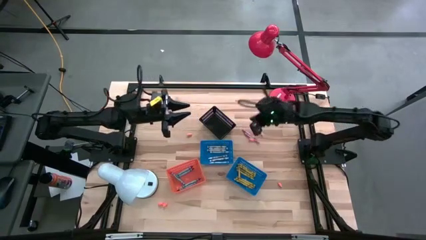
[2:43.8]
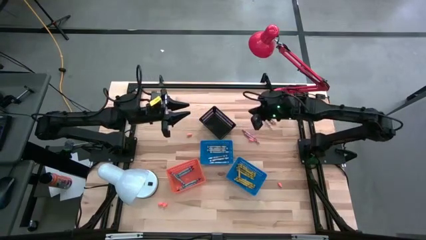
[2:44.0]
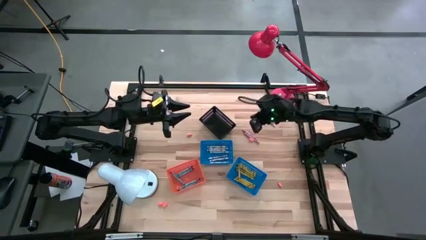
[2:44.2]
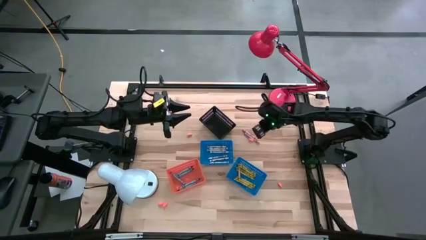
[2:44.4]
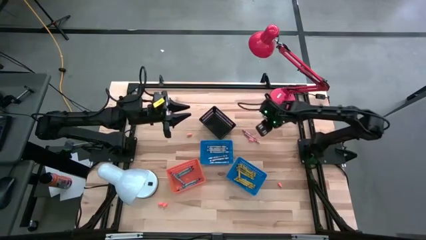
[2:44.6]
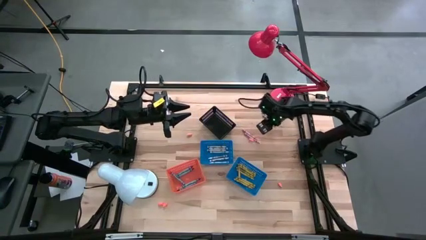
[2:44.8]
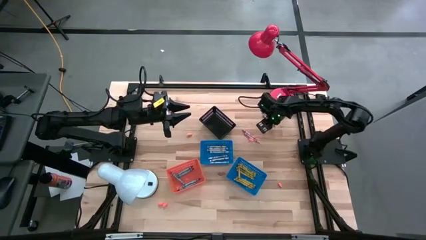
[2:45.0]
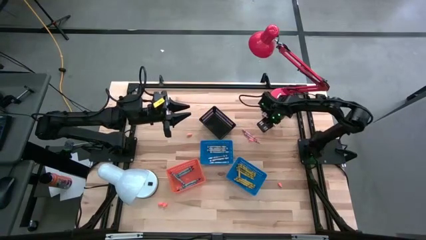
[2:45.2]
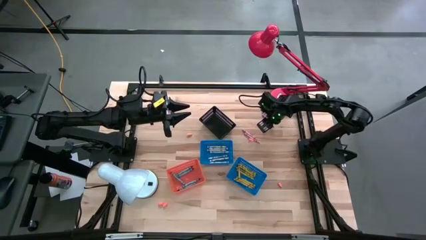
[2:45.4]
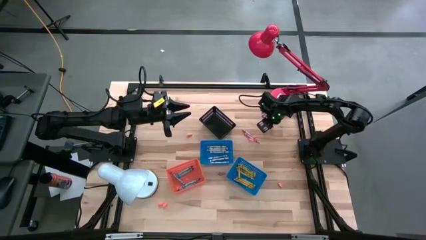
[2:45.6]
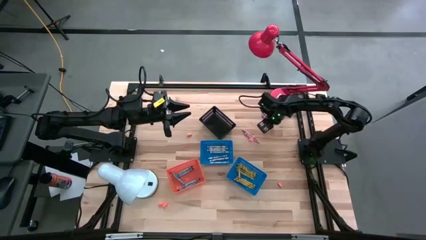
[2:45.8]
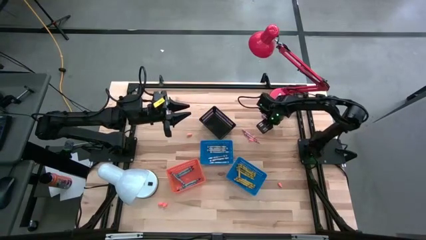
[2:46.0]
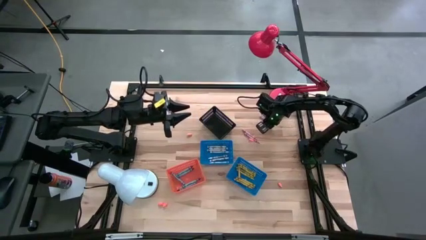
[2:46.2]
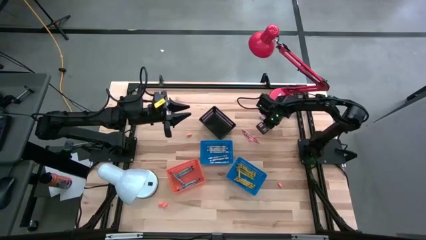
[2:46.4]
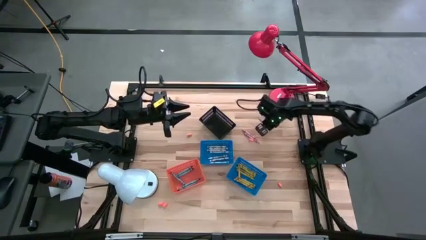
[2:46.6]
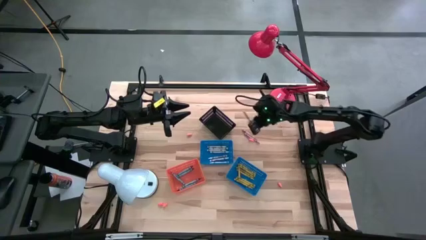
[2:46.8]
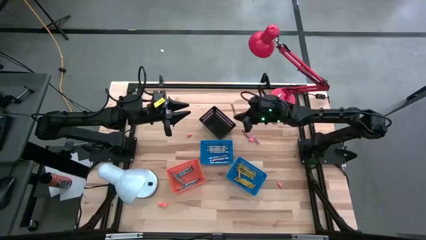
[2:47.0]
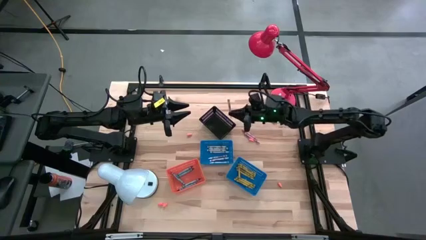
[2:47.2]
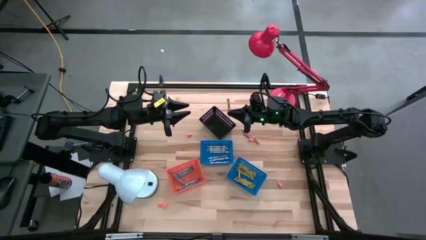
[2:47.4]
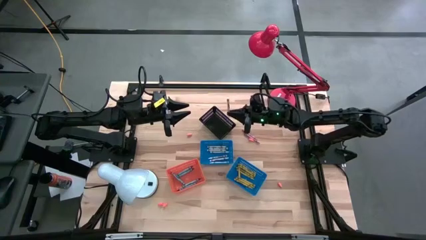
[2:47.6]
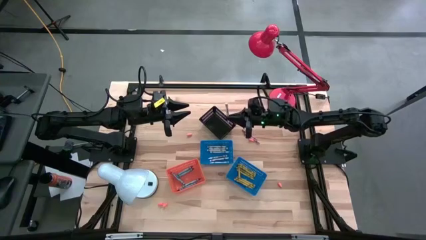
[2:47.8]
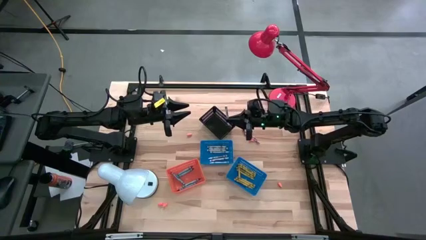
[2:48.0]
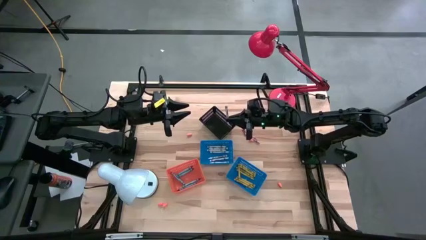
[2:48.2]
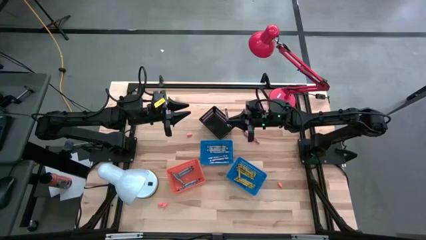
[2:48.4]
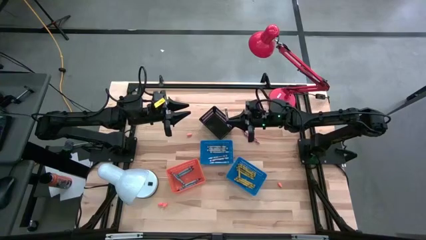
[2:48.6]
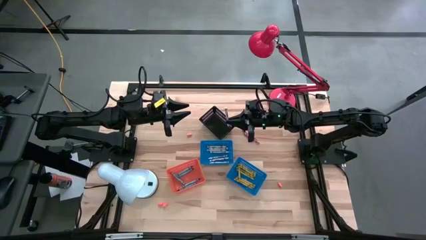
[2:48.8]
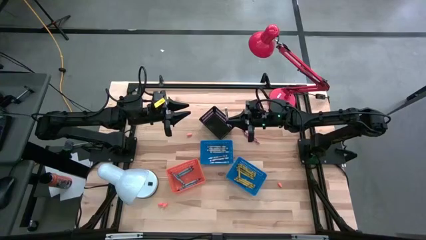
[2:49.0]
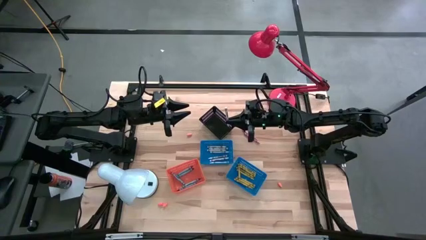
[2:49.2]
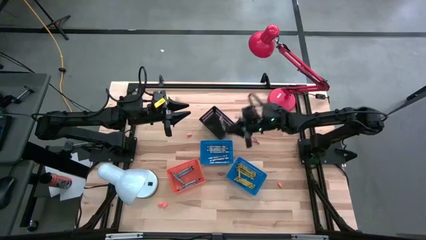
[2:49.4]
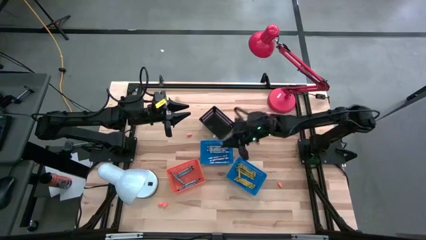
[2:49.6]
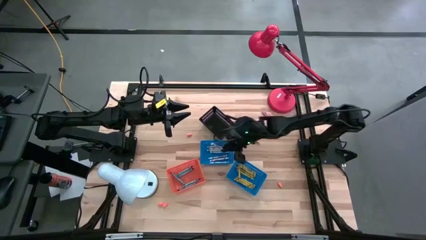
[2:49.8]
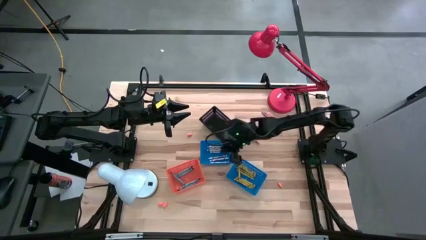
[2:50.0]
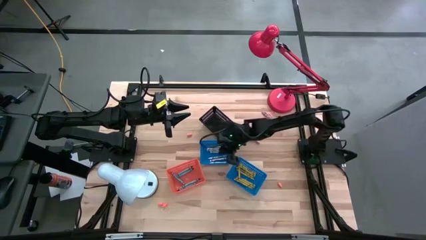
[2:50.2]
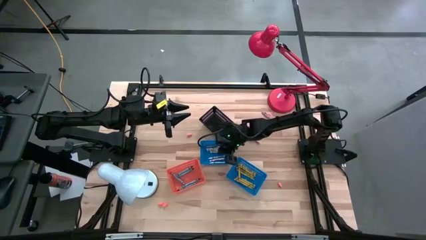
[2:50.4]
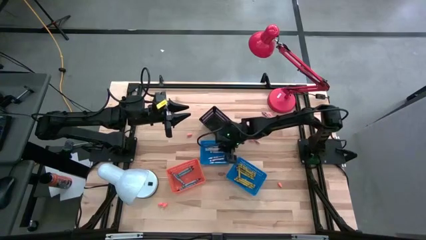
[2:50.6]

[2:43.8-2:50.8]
Task: Sort crayons
Put the white crayon into the left blue bin

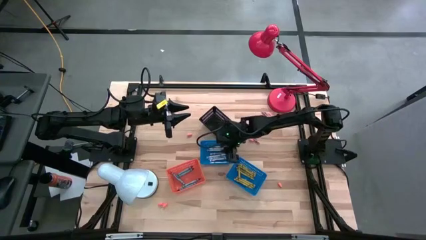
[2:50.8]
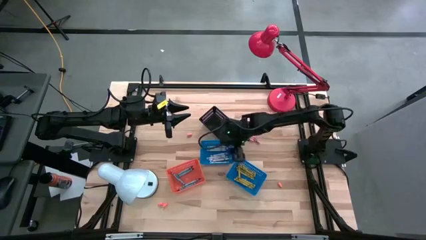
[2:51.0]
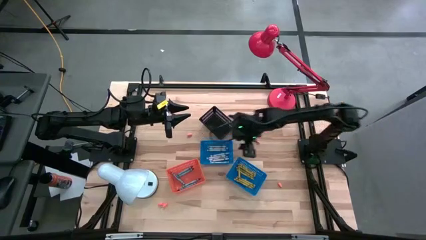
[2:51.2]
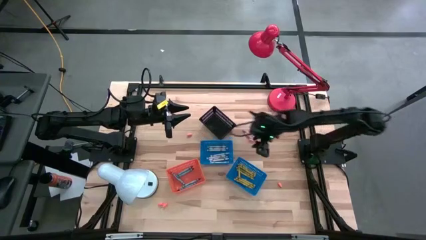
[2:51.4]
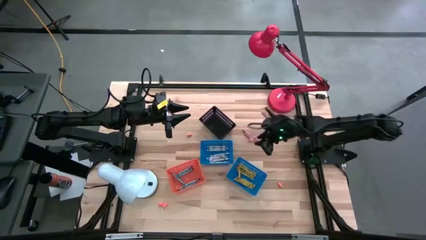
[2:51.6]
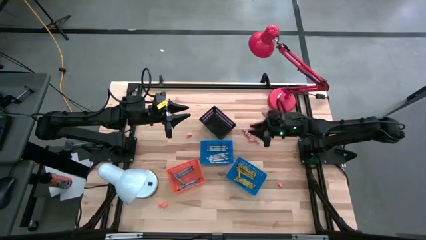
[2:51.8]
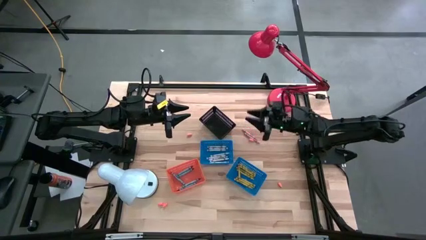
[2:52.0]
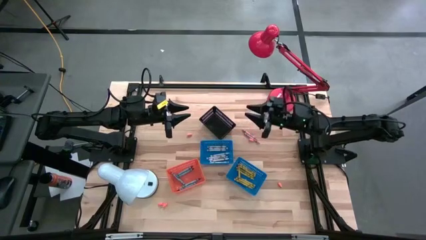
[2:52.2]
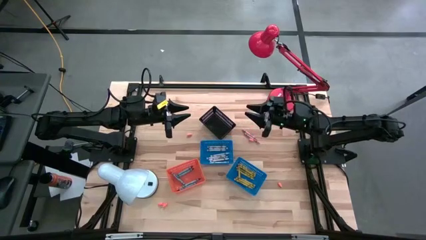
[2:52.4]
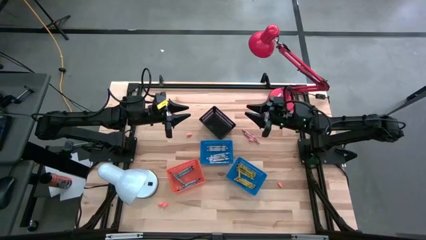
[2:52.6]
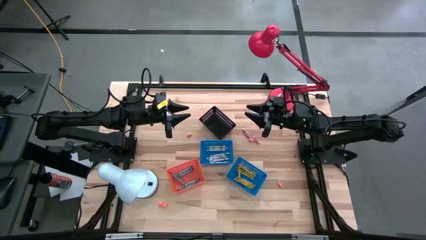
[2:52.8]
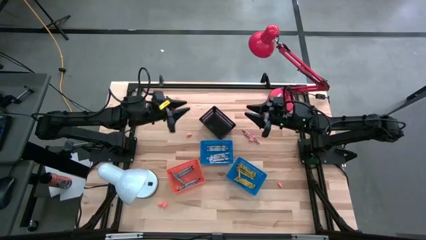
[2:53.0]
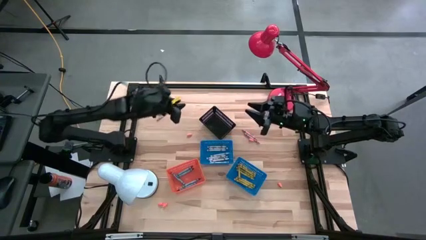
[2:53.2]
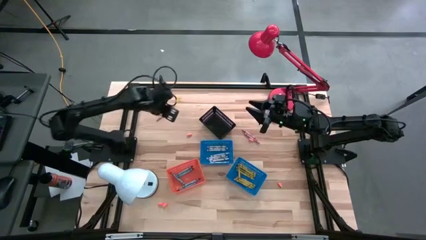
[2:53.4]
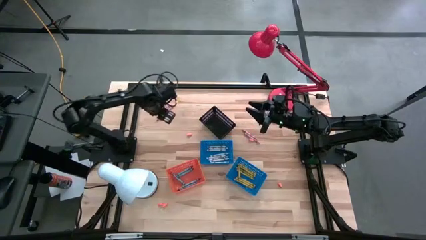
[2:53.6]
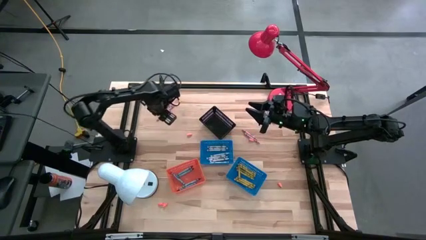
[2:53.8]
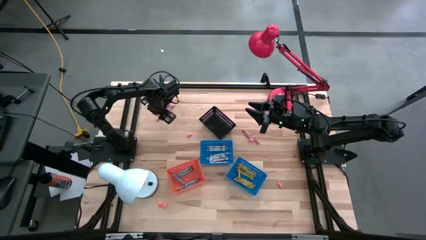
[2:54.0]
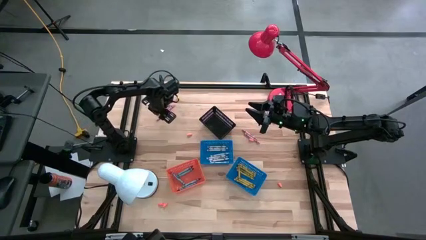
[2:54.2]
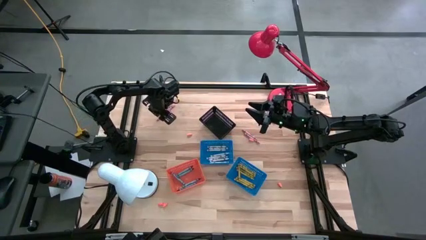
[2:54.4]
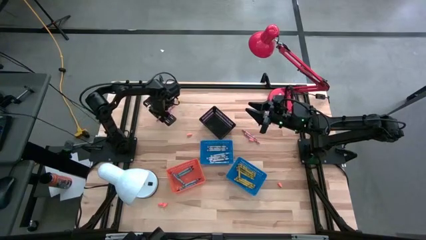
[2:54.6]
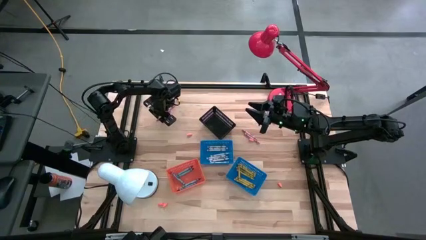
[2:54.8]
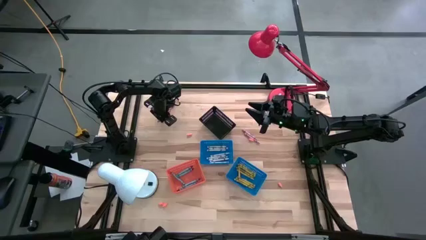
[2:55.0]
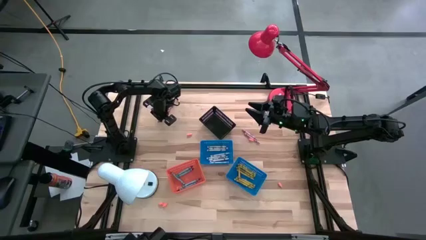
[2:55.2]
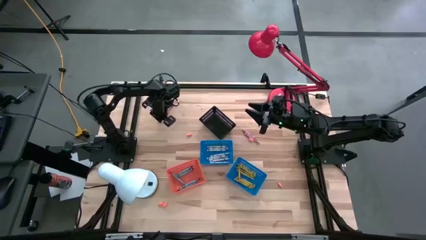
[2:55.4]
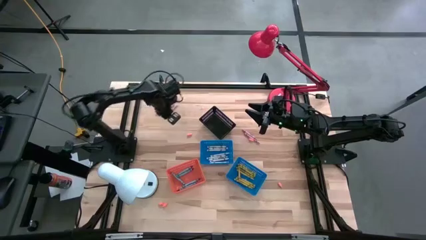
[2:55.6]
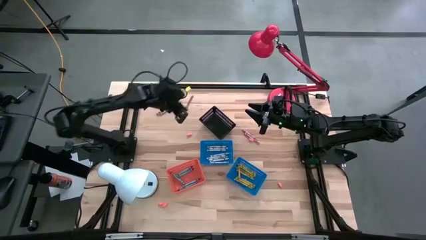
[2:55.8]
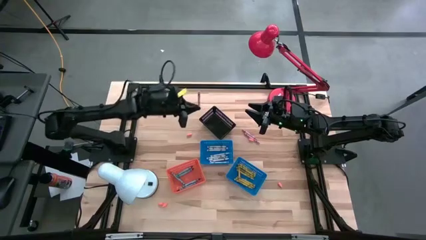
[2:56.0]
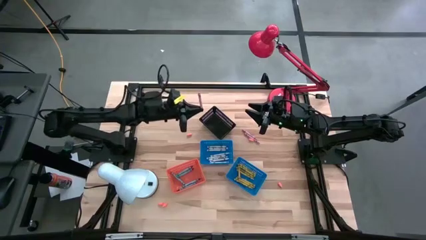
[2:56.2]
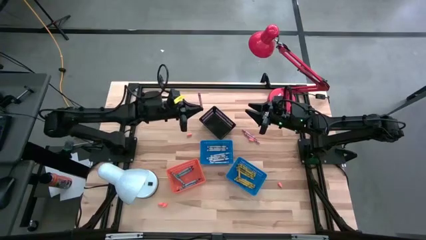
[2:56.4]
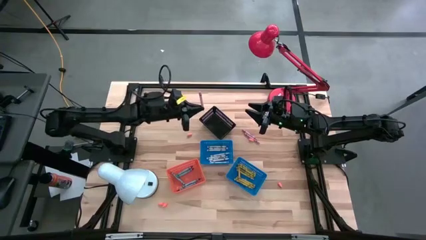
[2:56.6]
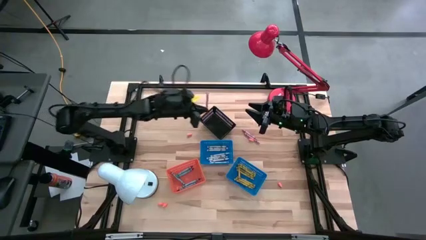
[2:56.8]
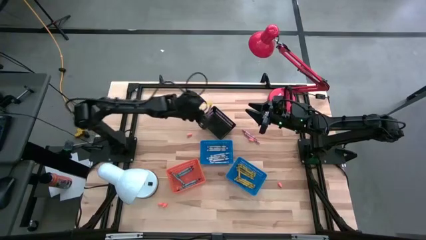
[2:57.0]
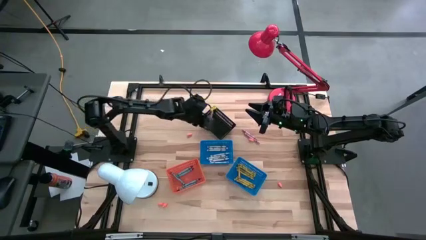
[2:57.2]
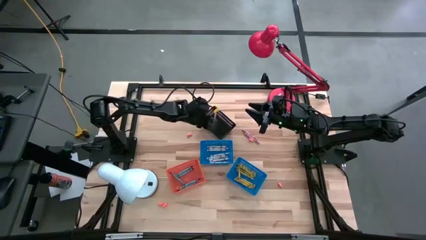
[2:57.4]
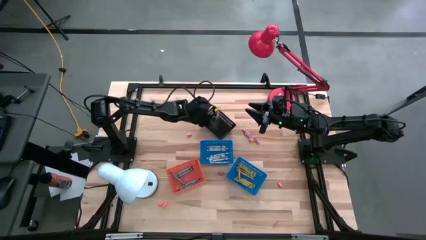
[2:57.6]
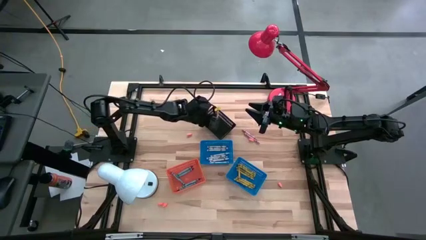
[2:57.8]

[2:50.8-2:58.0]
Put the pink crayon into the black bin

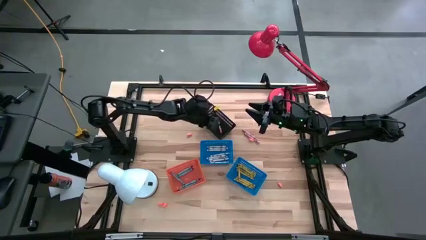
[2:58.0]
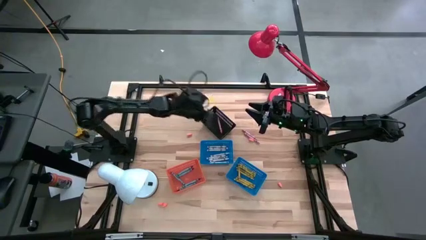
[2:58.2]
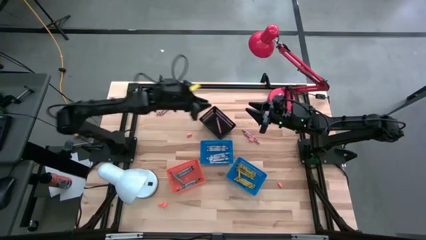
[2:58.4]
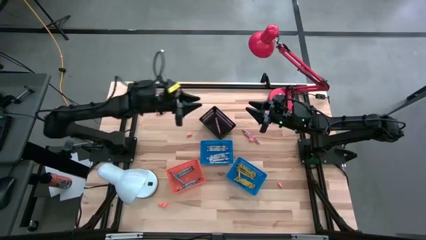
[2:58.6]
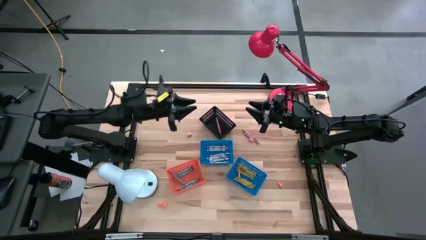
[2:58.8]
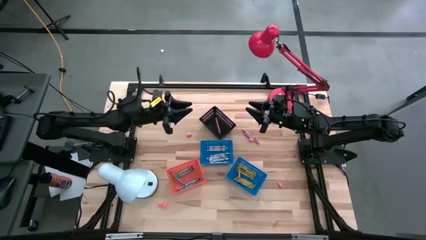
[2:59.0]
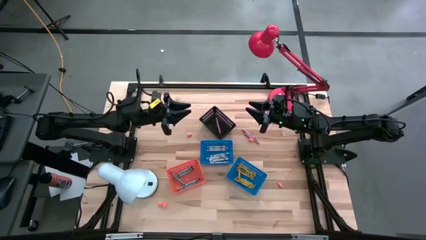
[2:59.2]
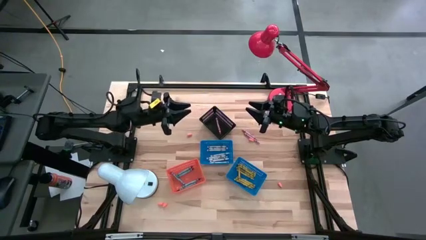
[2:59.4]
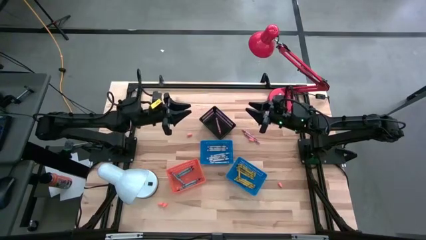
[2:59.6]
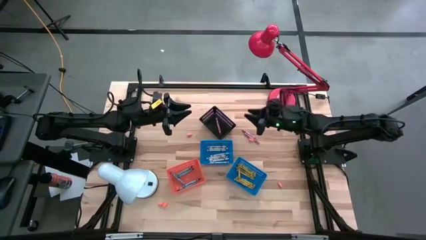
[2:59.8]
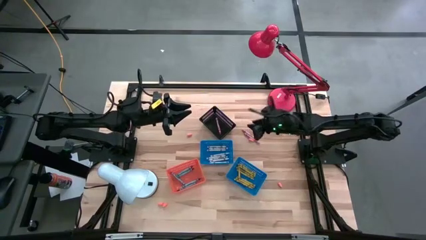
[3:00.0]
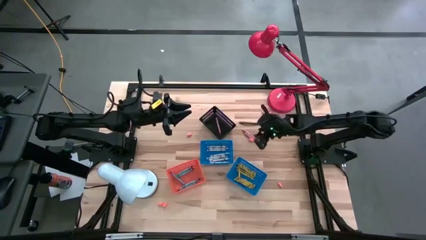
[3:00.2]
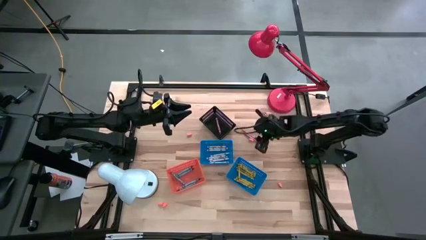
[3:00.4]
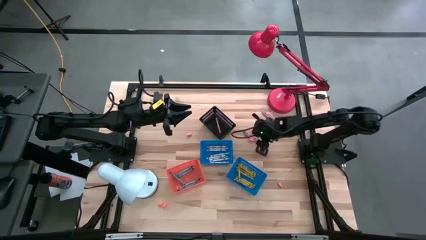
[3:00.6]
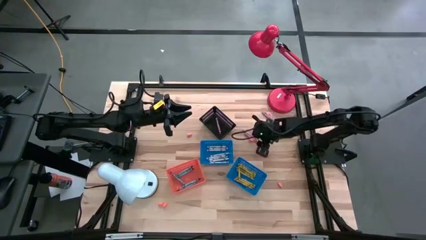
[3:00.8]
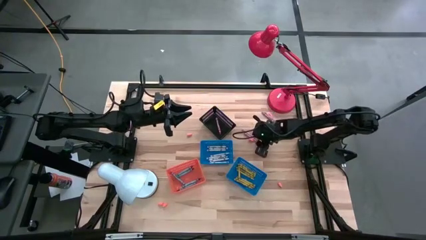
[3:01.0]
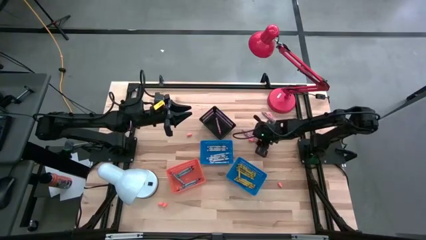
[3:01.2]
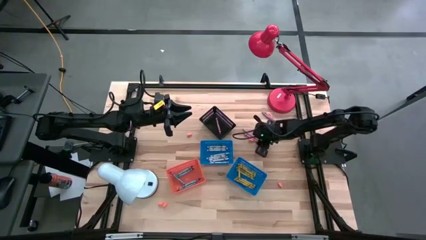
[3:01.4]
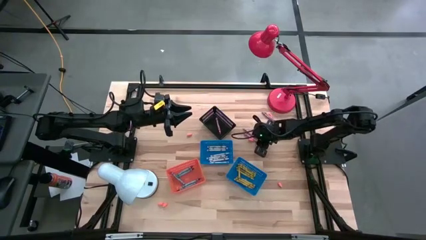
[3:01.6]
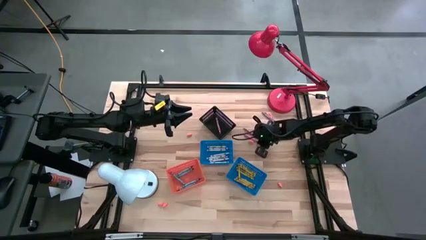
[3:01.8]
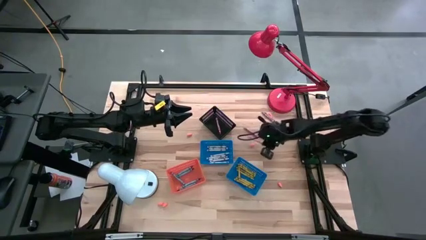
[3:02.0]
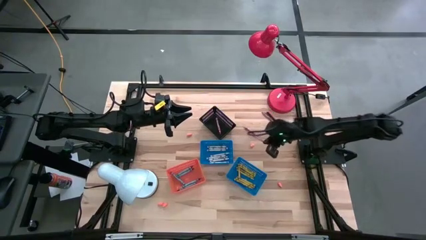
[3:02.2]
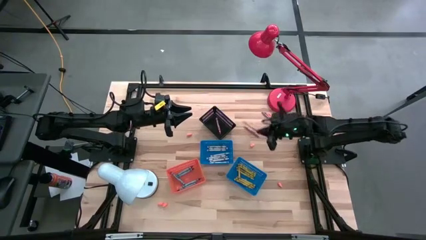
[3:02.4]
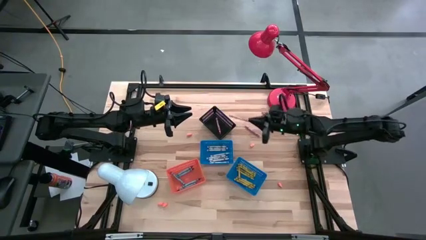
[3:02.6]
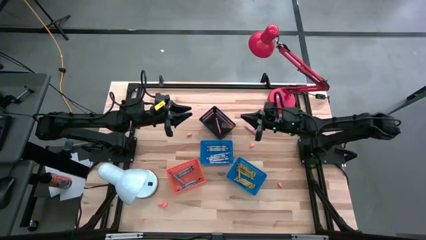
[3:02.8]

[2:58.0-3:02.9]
Put the pink crayon into the black bin
